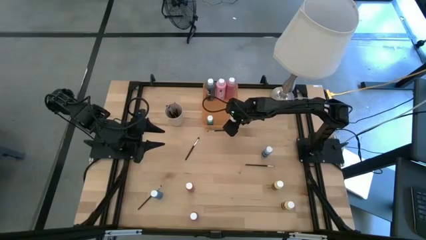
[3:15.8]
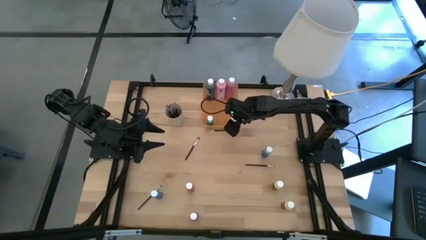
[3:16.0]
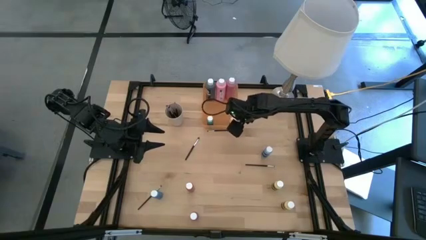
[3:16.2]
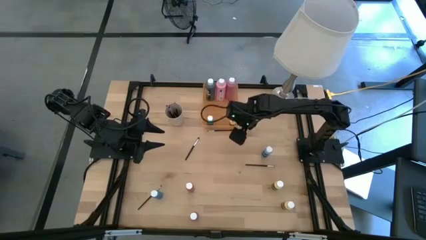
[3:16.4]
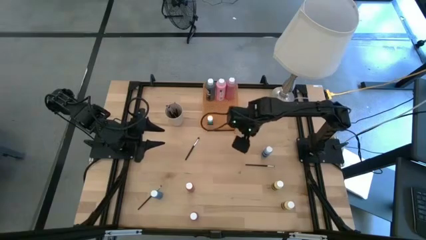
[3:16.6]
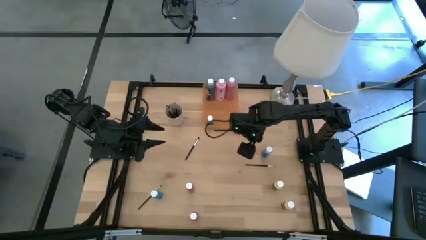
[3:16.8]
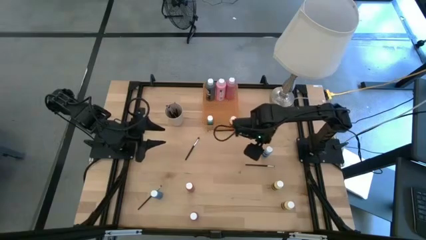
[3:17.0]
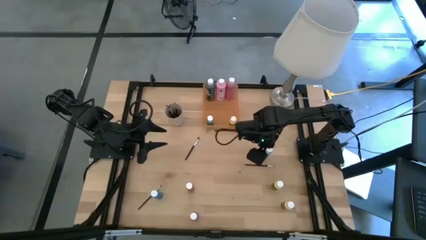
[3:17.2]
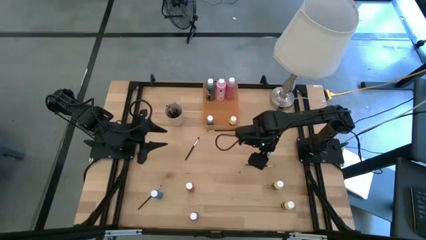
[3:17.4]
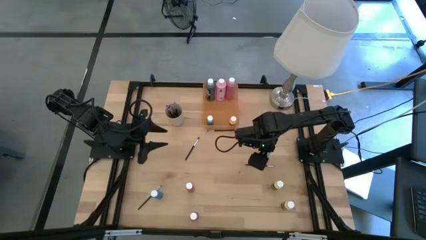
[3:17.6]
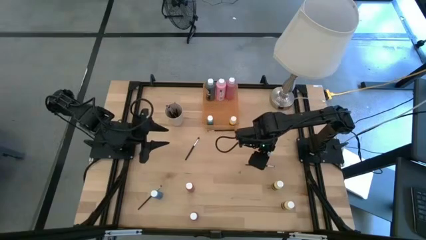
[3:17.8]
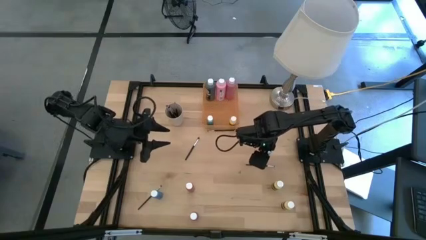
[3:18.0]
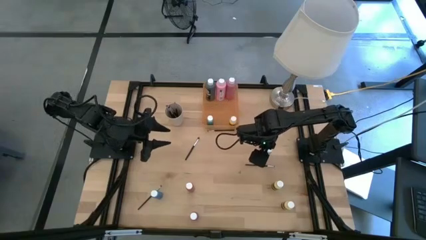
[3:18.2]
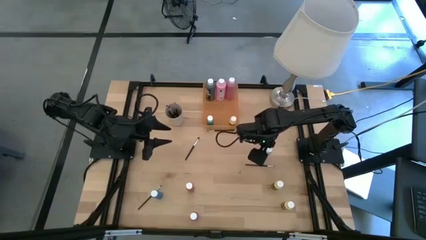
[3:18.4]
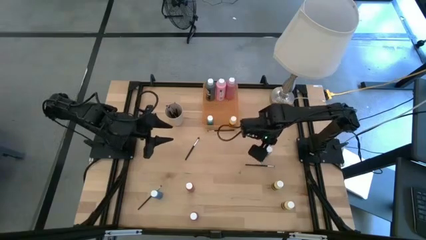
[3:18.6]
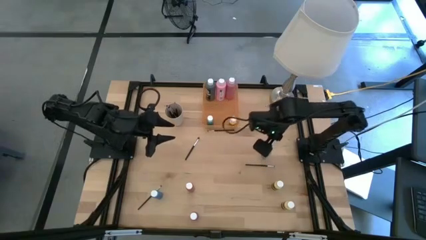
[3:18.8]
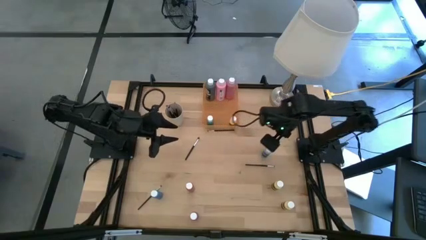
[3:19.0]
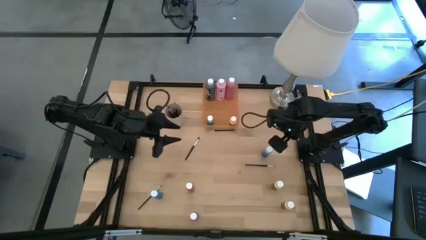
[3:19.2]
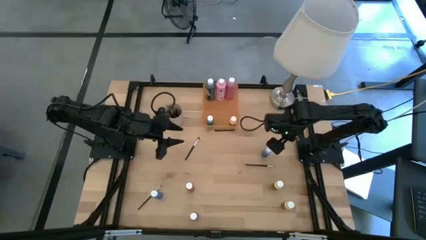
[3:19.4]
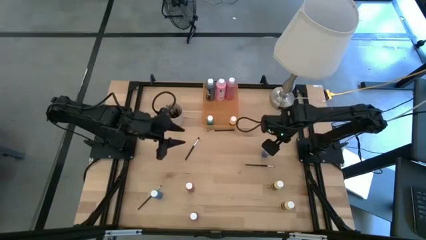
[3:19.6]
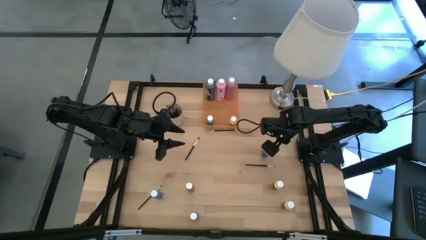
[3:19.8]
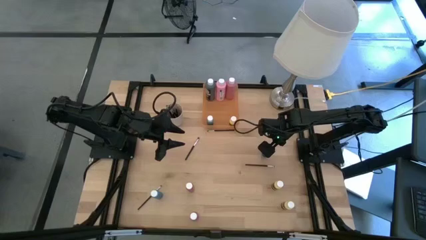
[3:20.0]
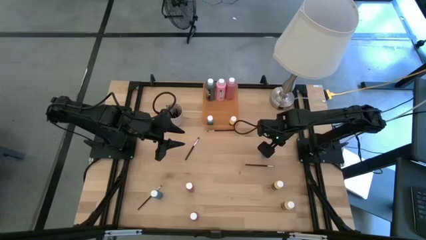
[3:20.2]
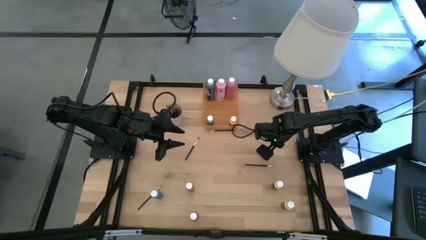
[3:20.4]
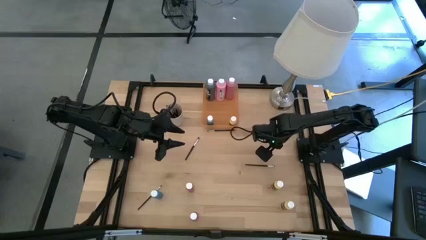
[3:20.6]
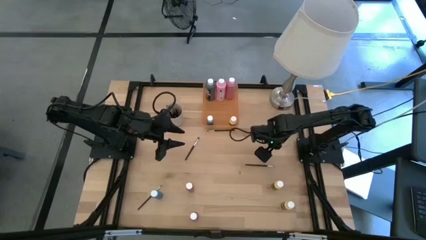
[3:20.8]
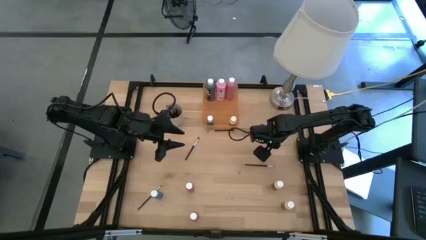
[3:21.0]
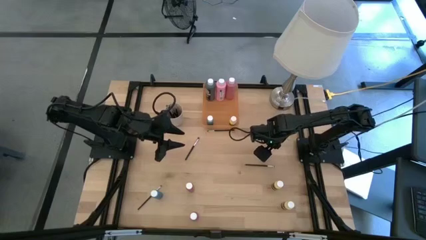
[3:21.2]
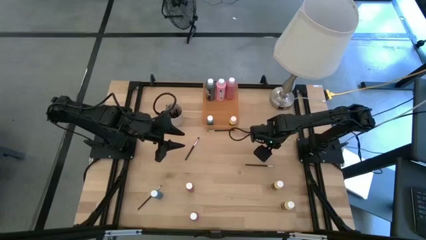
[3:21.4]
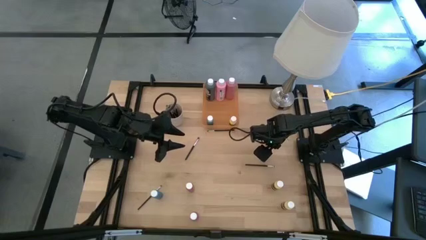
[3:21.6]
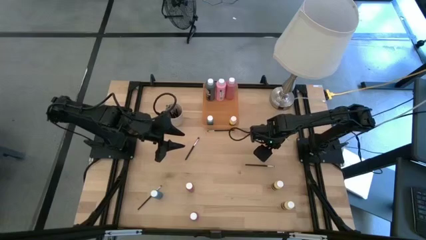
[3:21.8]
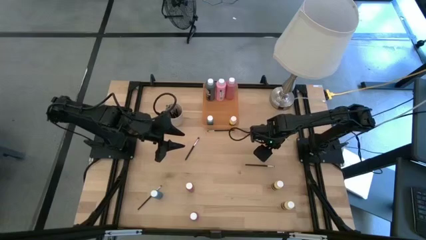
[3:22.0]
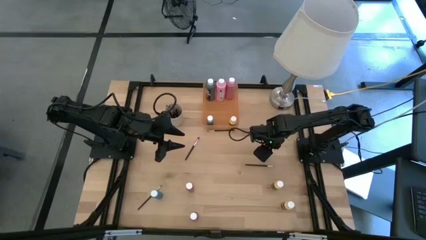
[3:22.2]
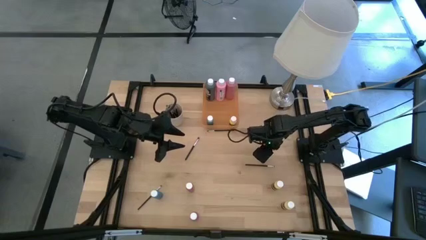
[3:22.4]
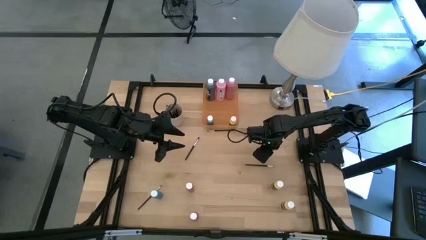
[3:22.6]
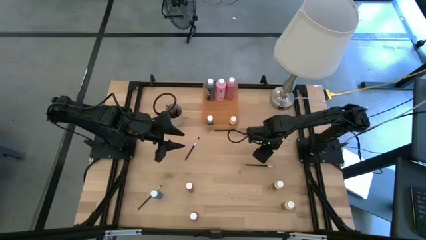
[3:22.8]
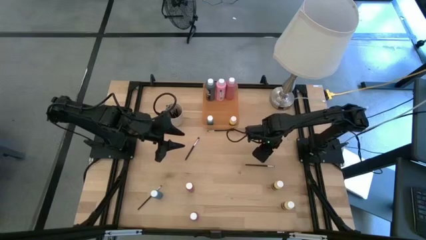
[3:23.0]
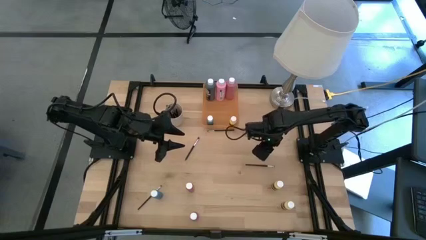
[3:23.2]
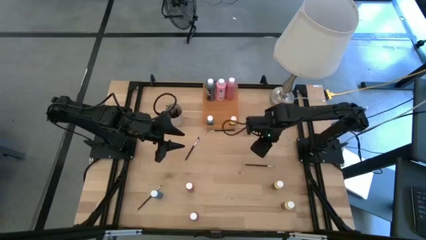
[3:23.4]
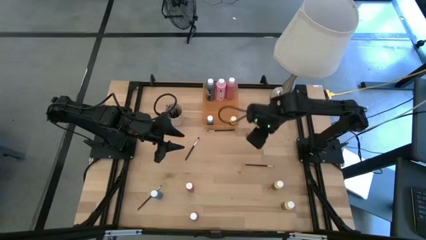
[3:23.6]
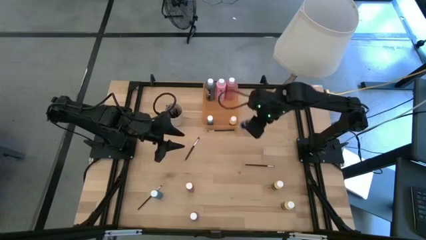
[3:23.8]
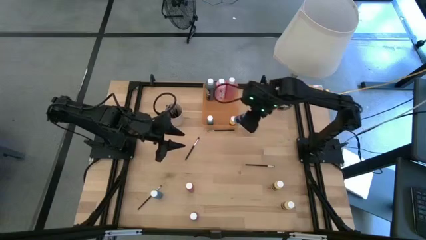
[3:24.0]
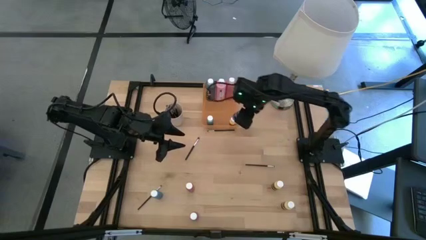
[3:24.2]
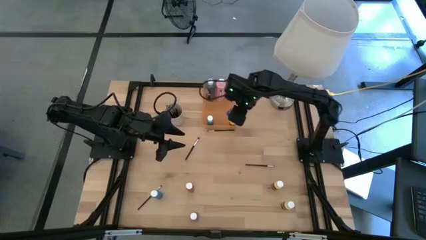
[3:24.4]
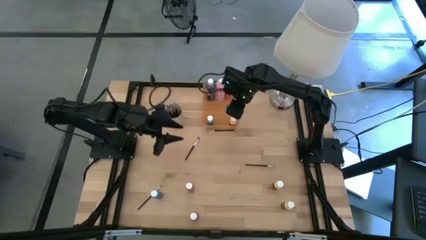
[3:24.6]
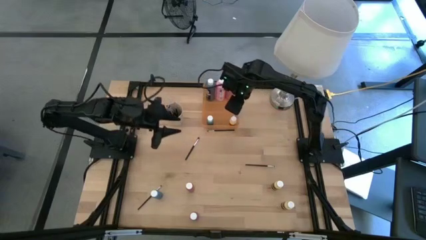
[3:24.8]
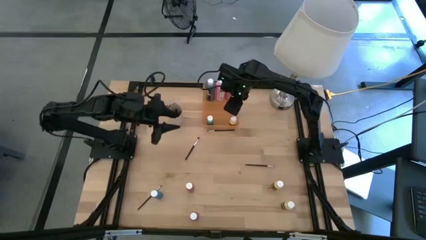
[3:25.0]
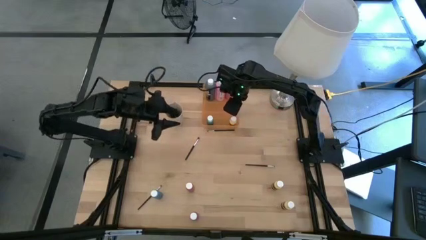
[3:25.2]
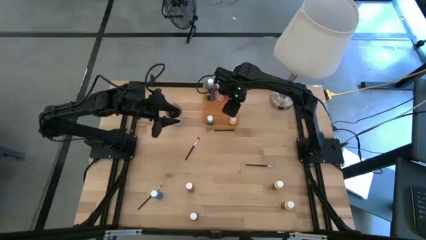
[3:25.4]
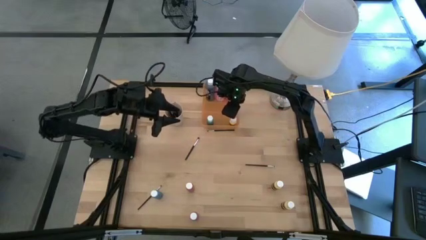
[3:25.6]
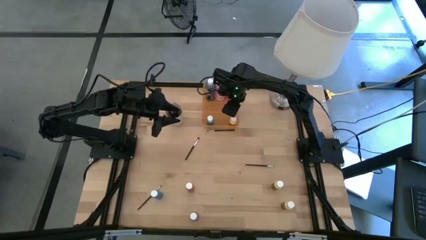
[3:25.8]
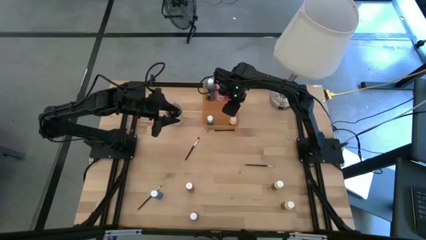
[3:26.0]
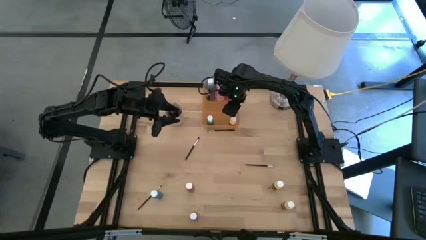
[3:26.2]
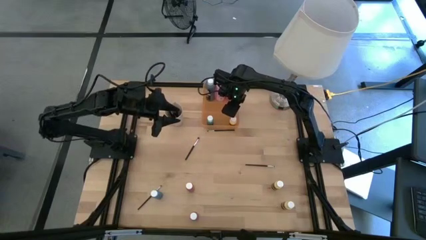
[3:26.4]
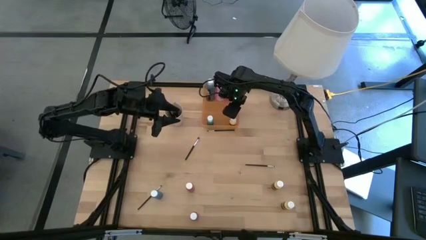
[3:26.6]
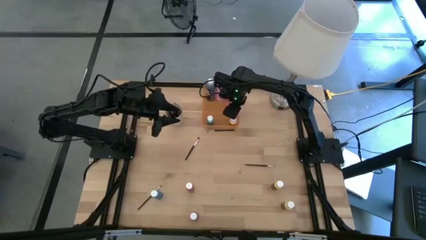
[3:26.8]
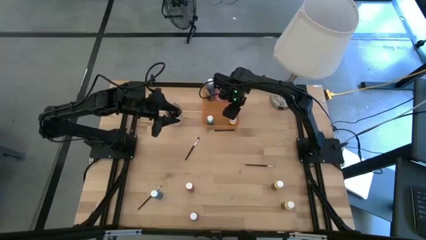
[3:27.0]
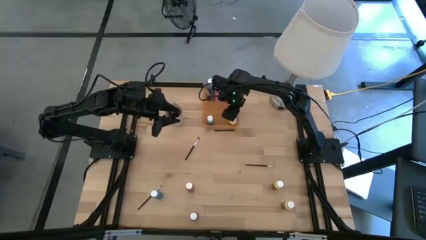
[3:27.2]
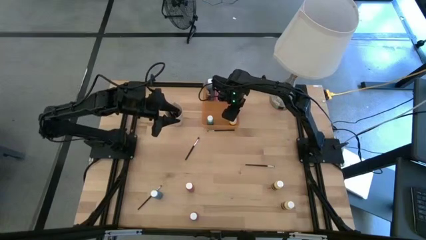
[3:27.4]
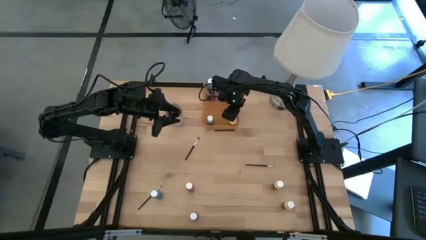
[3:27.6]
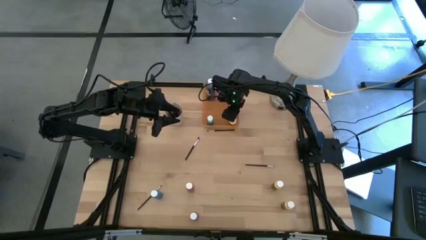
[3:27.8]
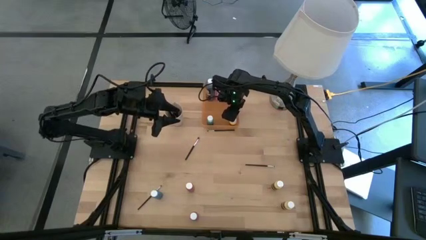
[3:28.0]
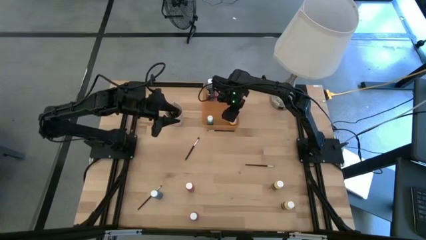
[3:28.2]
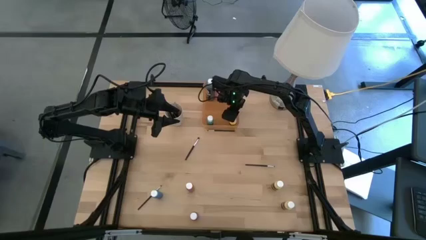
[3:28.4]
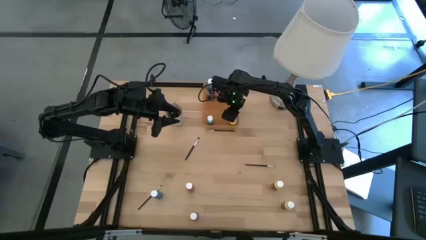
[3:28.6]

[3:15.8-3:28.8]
Task: Pick & Place Paint Supplies
Put the blue paint bottle into the orange bin

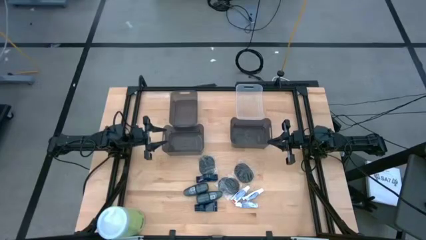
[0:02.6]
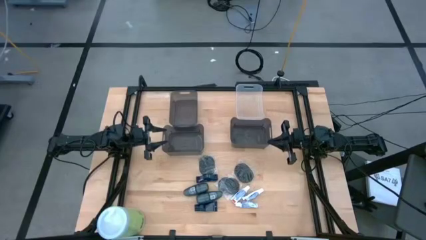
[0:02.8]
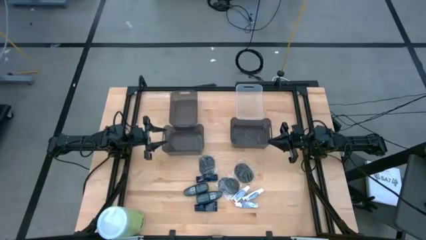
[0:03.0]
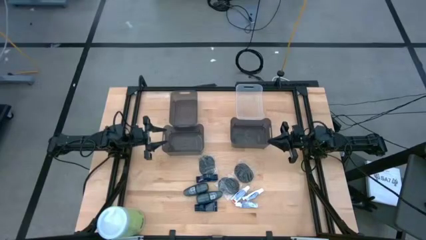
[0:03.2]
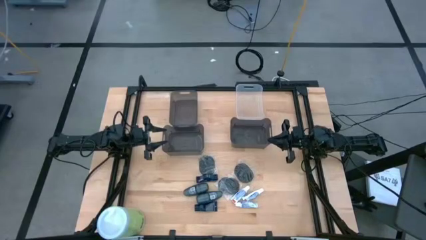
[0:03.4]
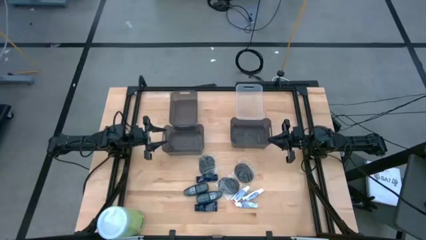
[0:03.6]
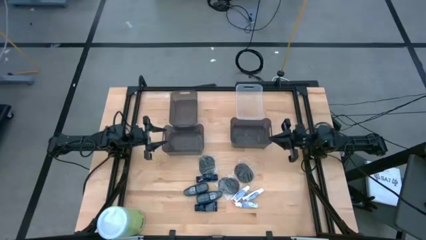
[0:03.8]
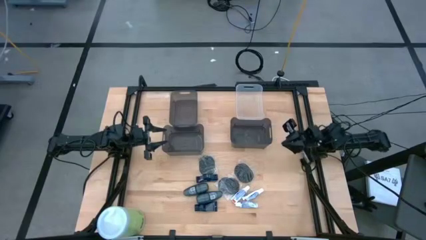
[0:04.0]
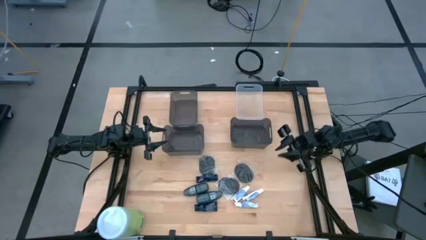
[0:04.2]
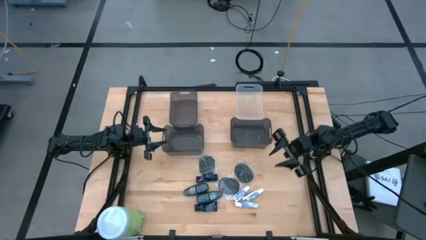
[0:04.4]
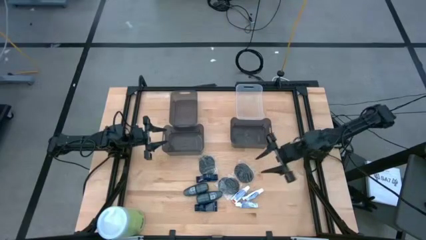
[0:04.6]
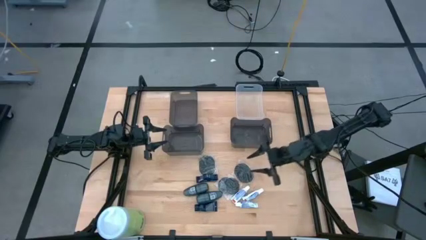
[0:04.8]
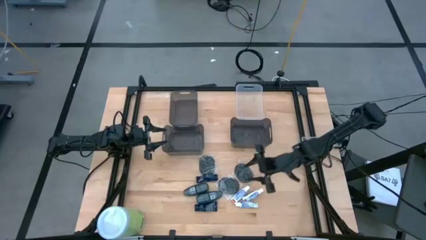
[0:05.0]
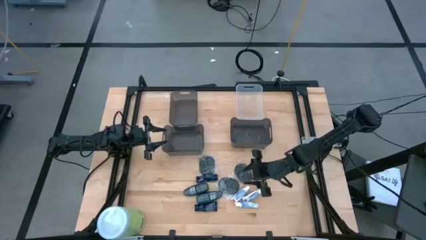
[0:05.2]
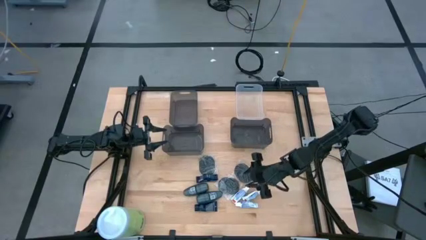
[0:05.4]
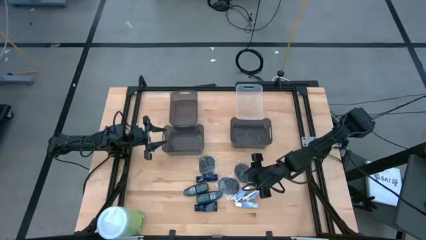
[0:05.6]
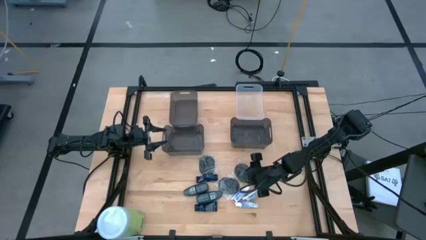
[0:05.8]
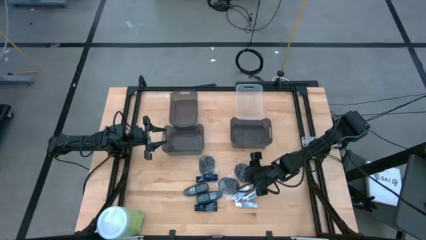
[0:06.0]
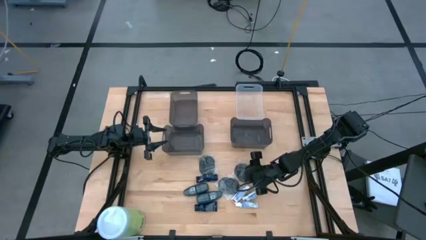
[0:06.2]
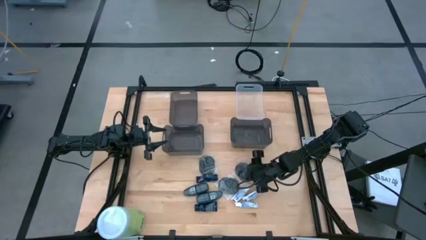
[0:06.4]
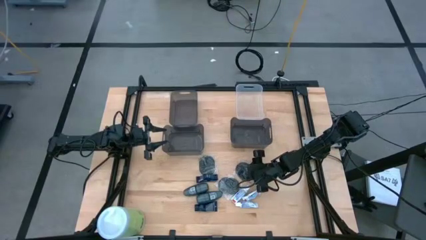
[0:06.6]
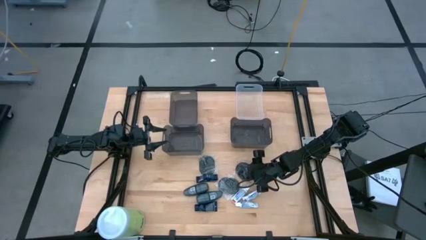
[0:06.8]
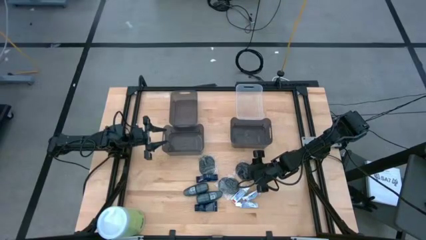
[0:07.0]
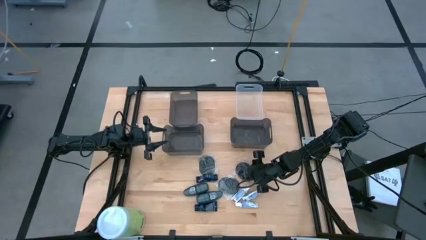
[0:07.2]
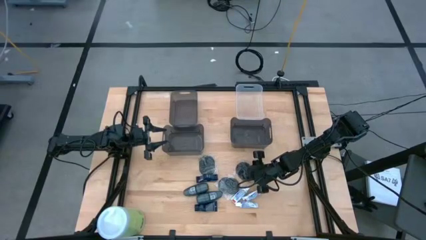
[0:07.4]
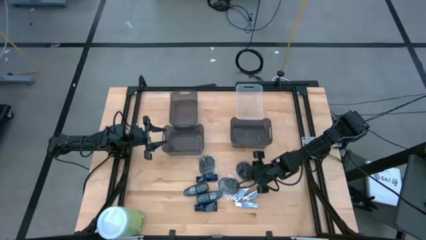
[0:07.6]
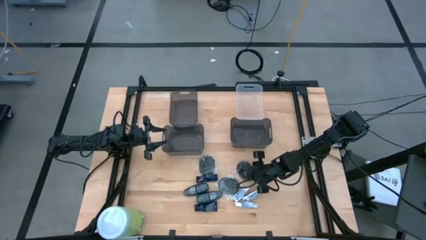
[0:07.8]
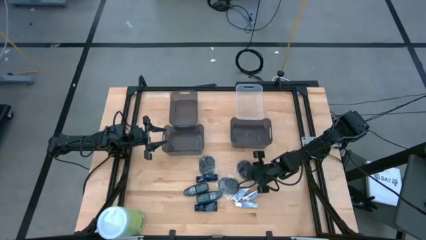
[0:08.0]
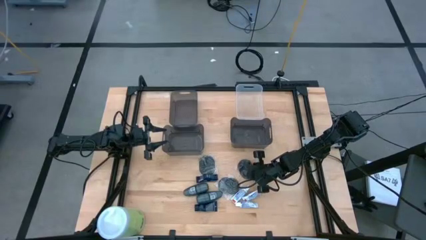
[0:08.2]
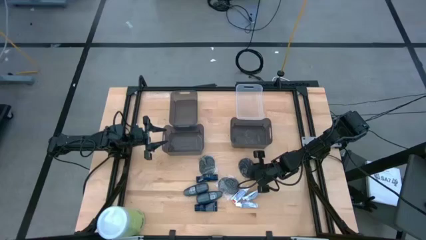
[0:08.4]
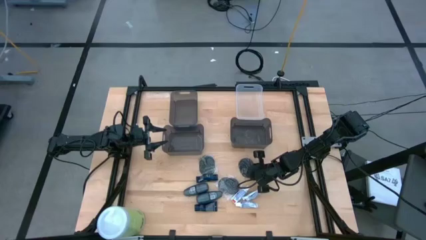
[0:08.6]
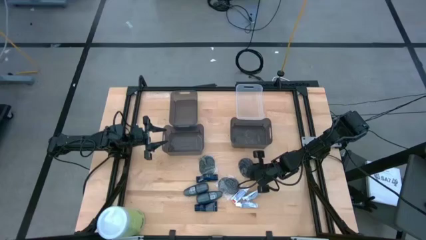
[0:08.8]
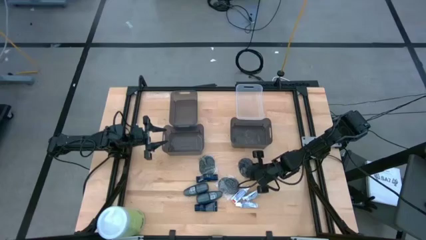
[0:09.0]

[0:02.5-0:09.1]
Task: Pick & Place Travel size toiletries
Put the top right black hairbrush into the transparent bin
